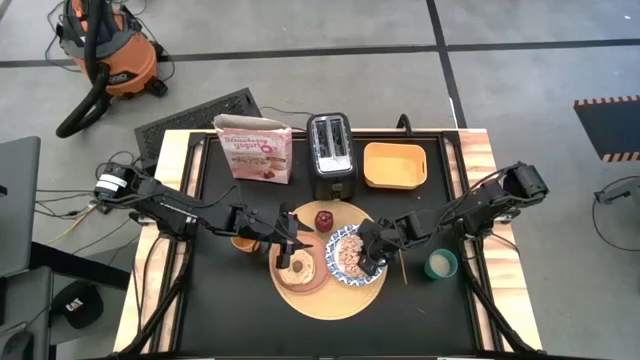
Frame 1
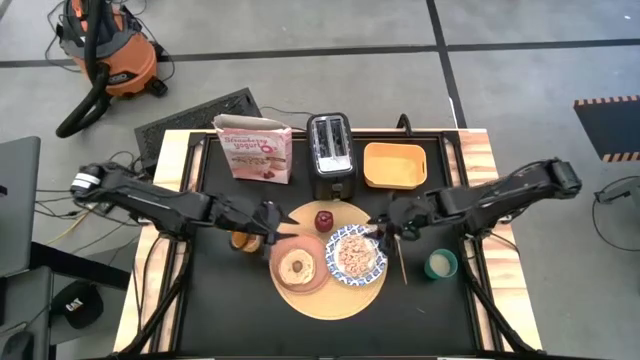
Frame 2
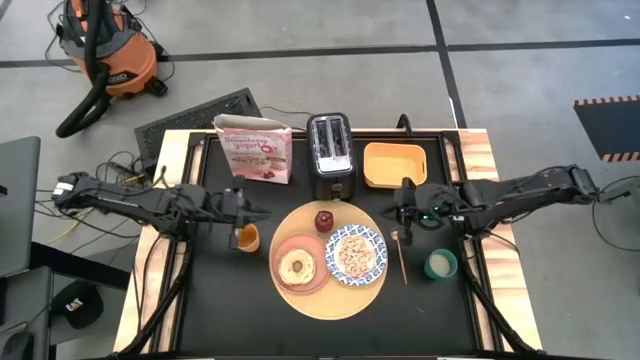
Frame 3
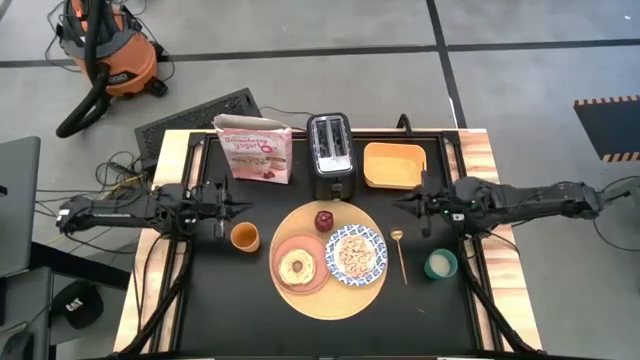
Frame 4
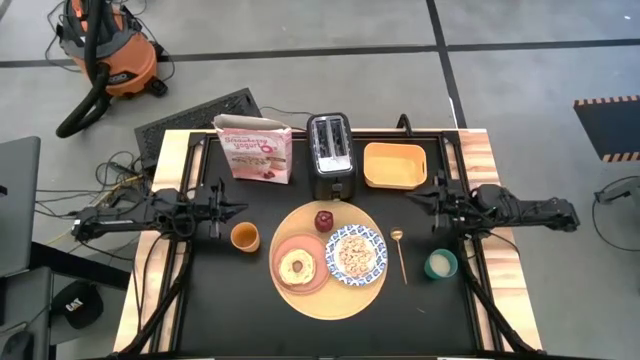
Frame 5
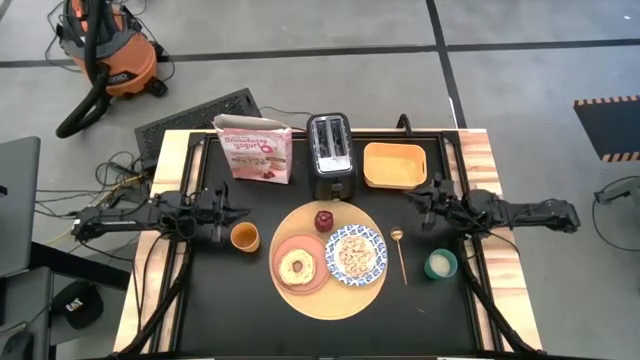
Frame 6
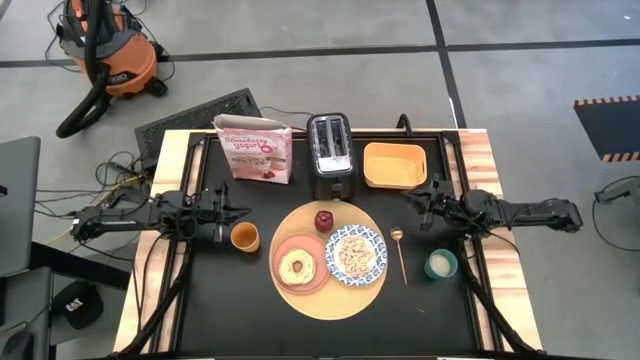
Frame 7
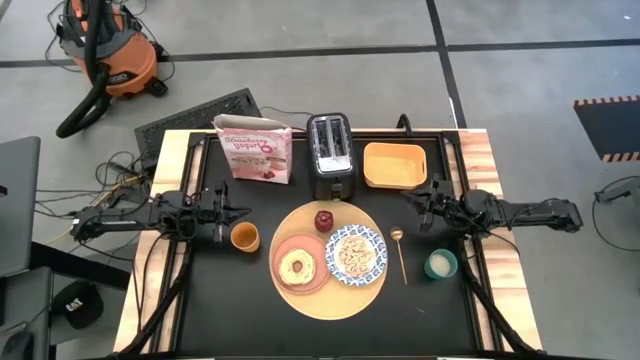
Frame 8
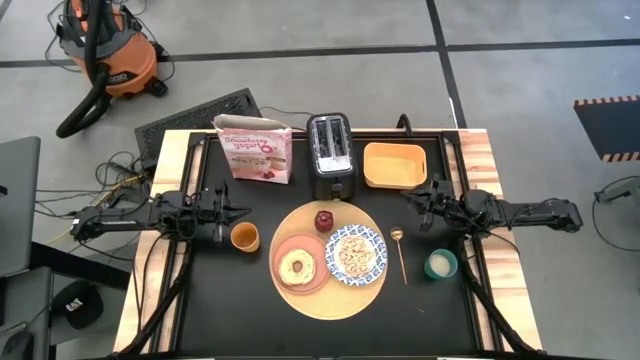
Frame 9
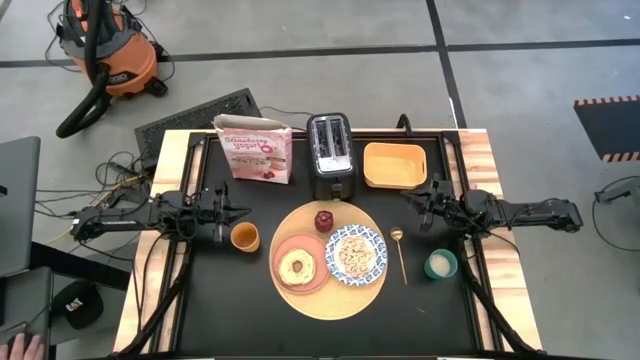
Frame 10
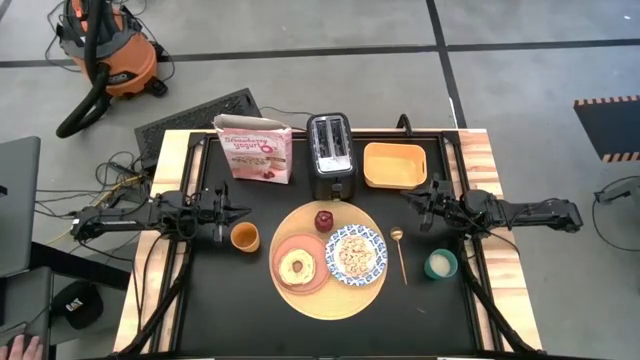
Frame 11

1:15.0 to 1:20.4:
Task: Arrange a breakfast setting
Return to Home Position

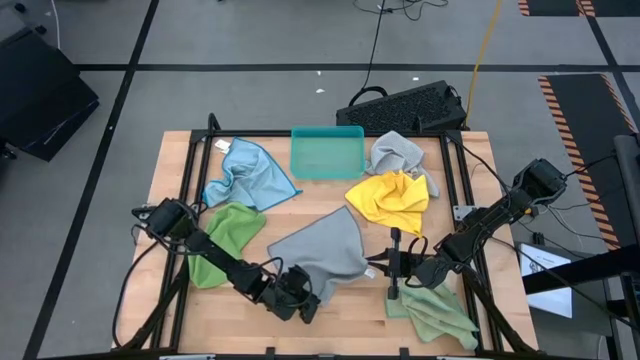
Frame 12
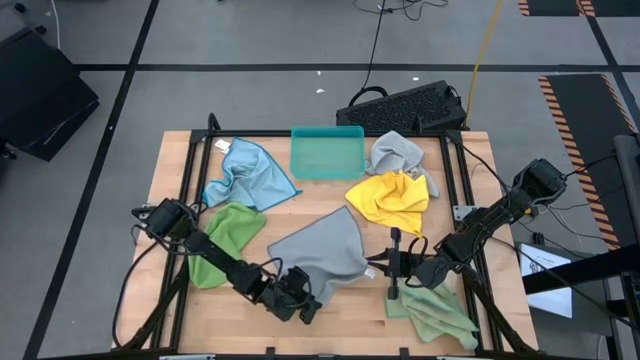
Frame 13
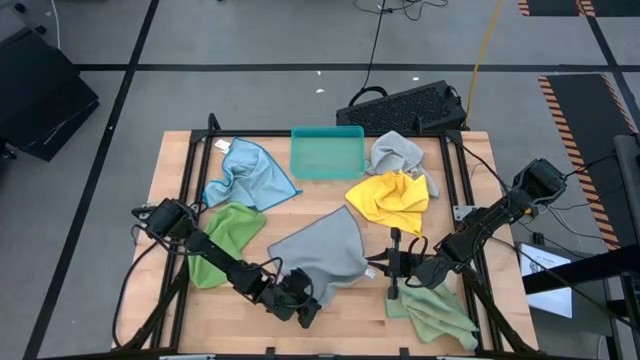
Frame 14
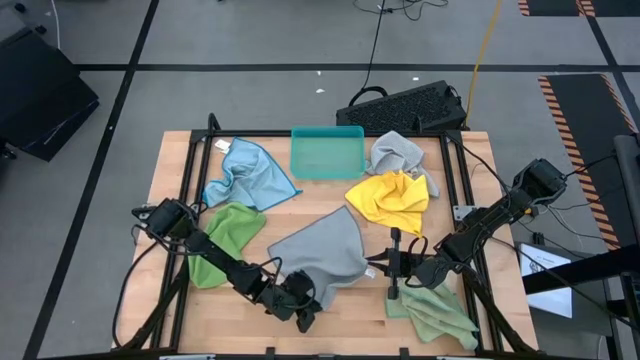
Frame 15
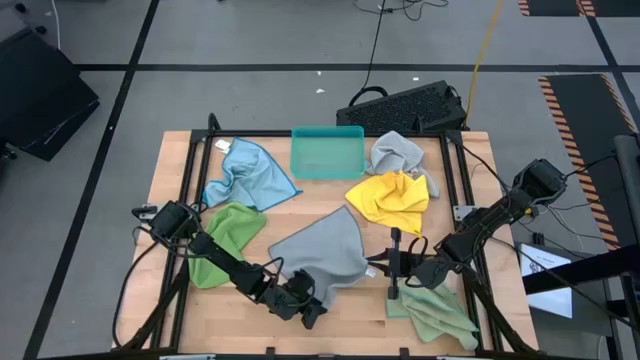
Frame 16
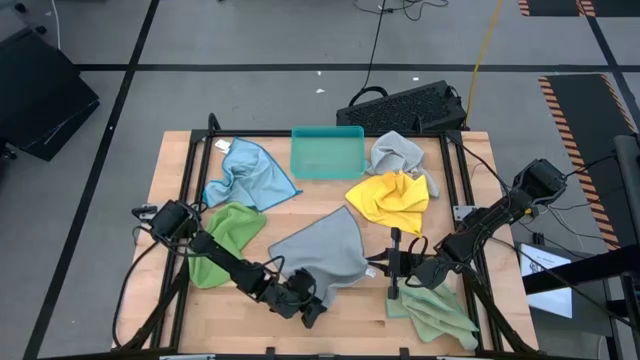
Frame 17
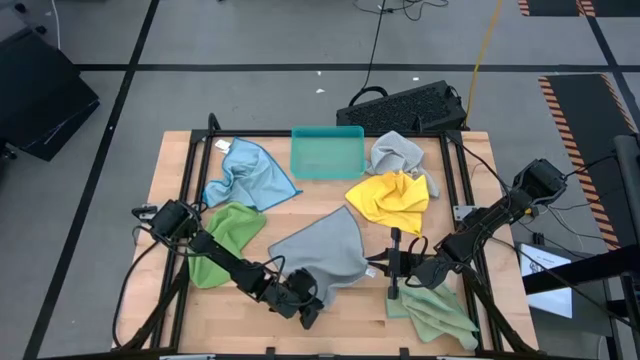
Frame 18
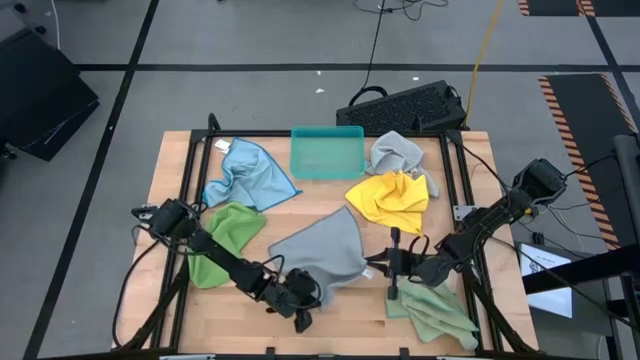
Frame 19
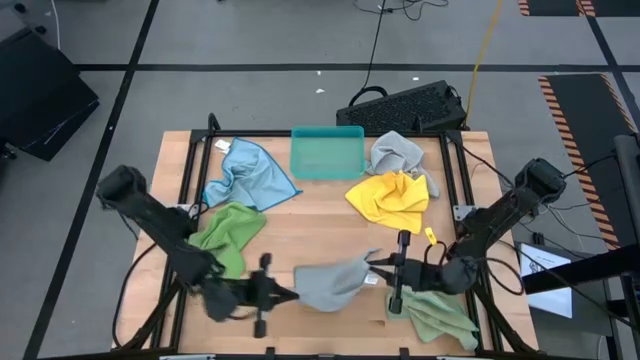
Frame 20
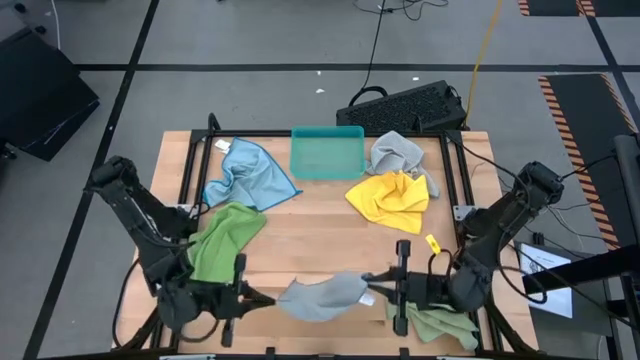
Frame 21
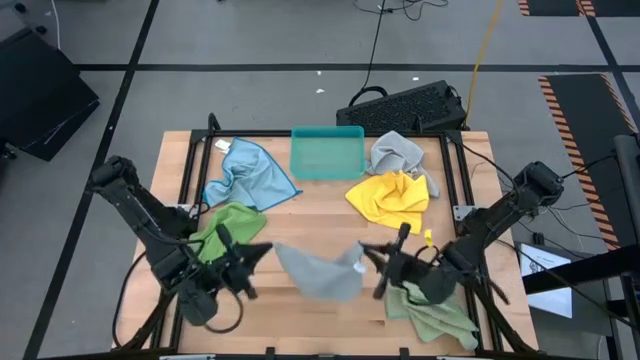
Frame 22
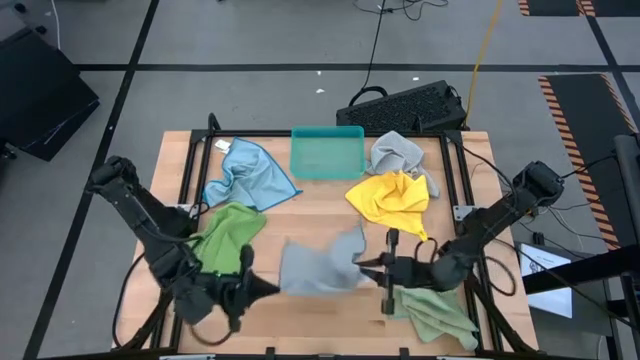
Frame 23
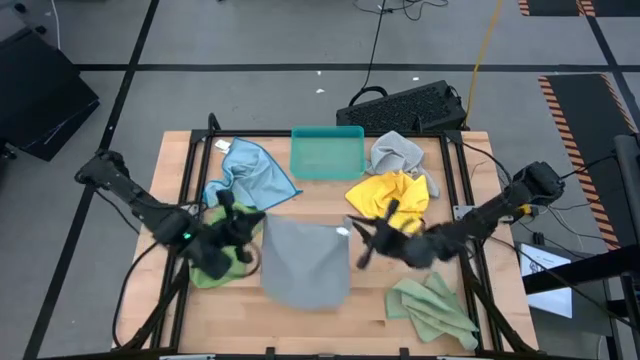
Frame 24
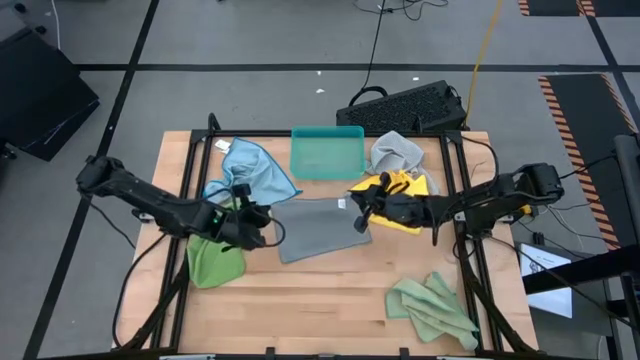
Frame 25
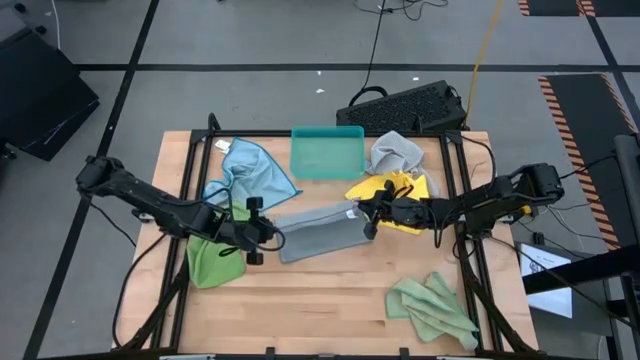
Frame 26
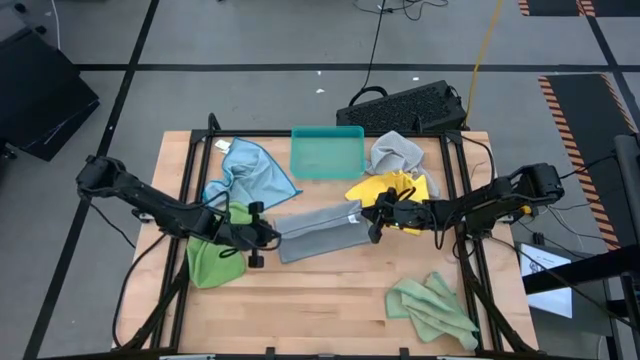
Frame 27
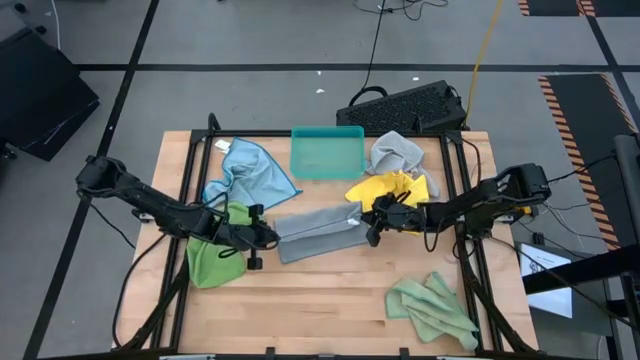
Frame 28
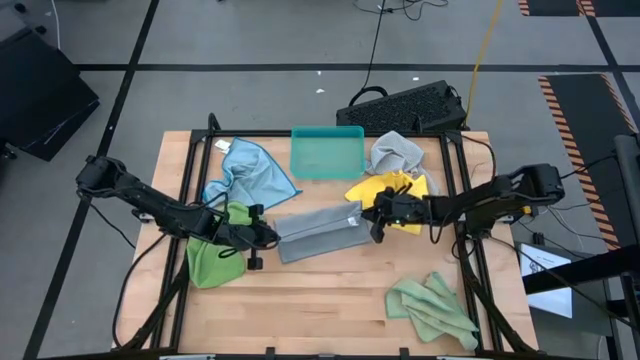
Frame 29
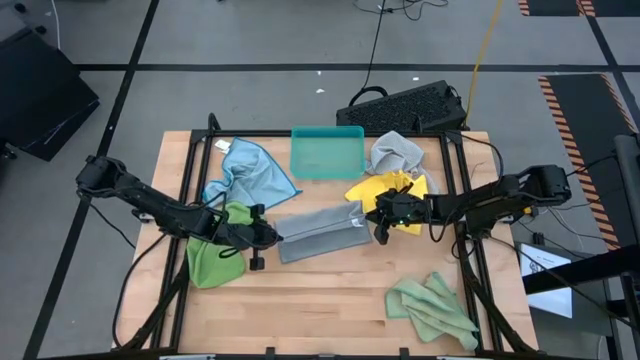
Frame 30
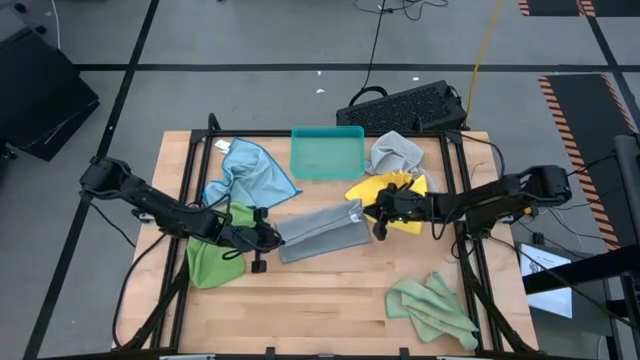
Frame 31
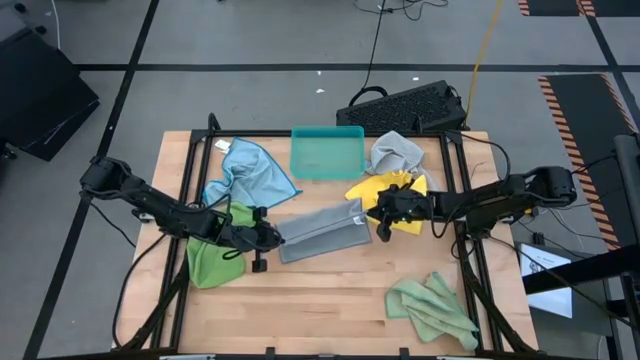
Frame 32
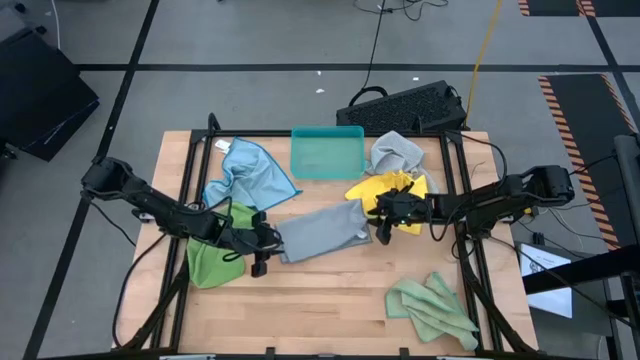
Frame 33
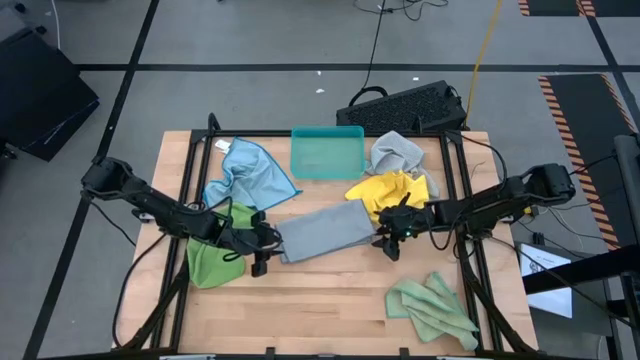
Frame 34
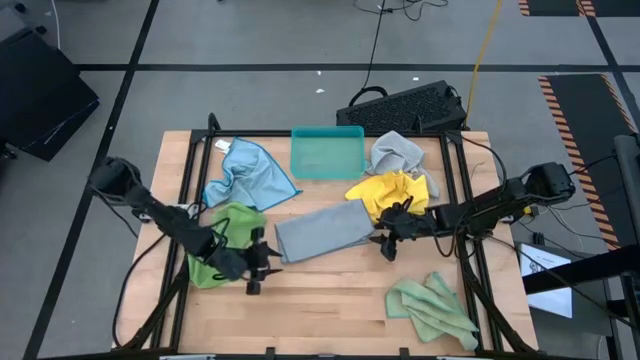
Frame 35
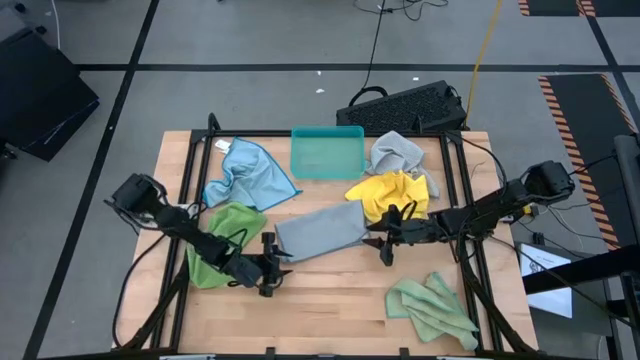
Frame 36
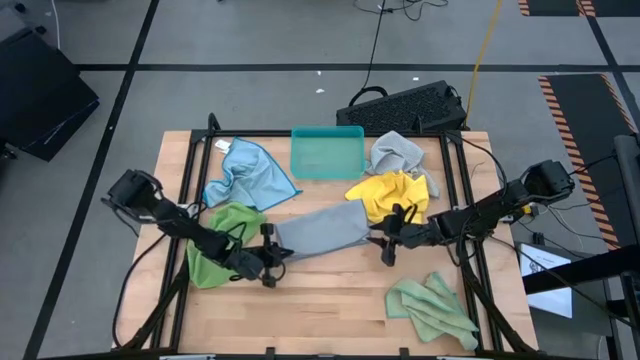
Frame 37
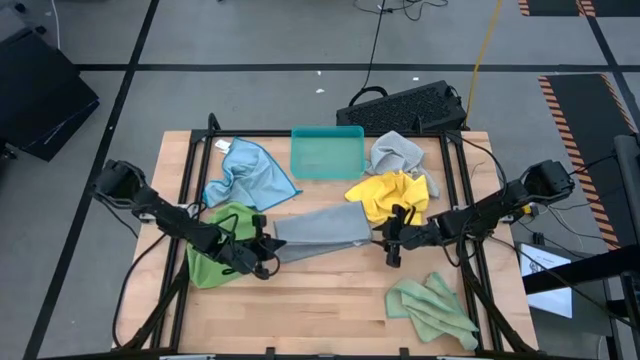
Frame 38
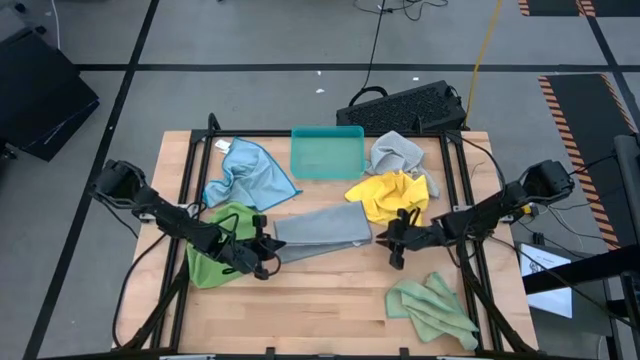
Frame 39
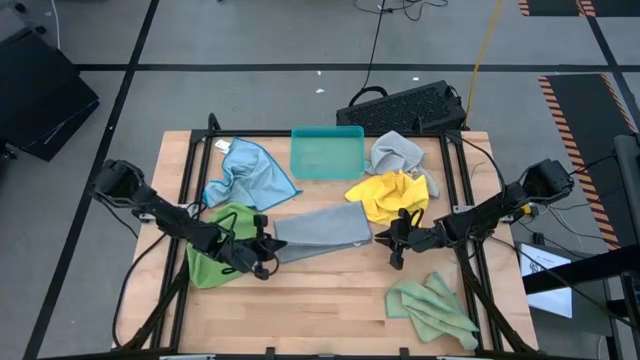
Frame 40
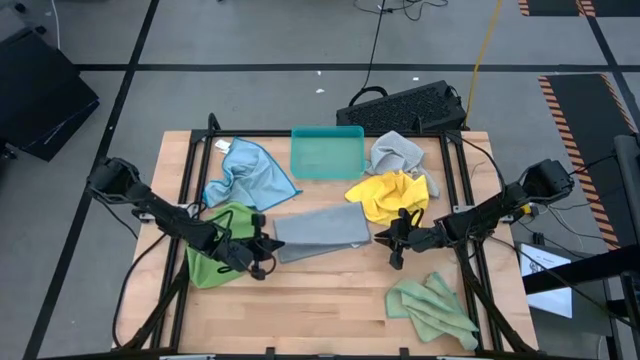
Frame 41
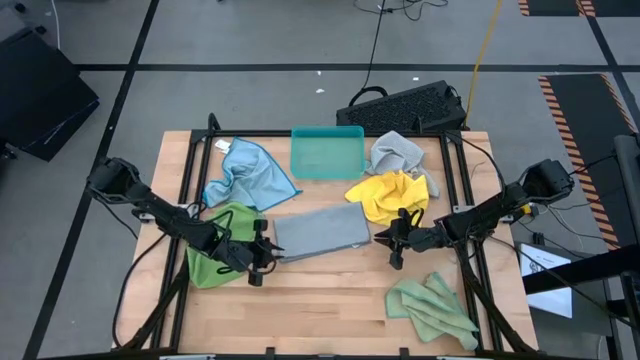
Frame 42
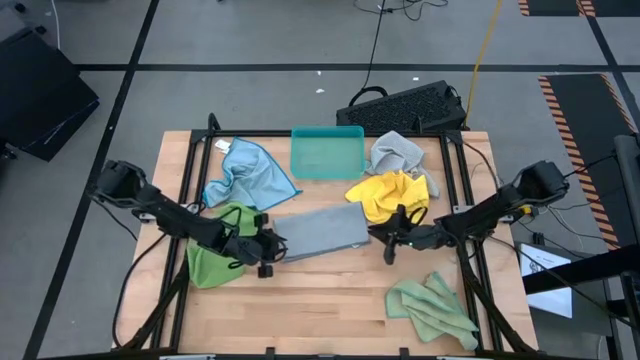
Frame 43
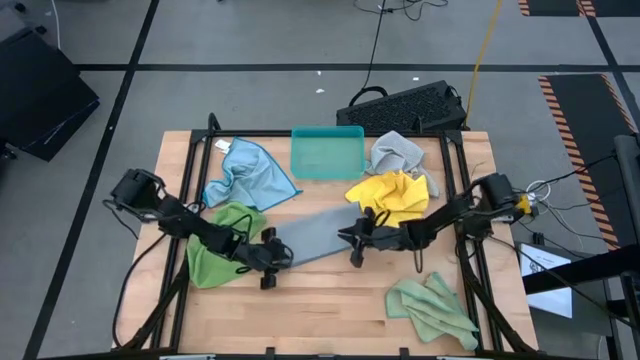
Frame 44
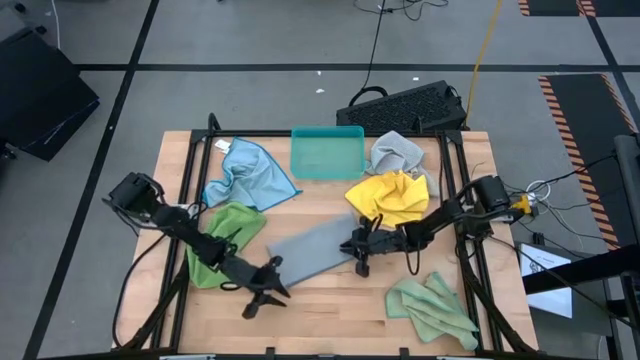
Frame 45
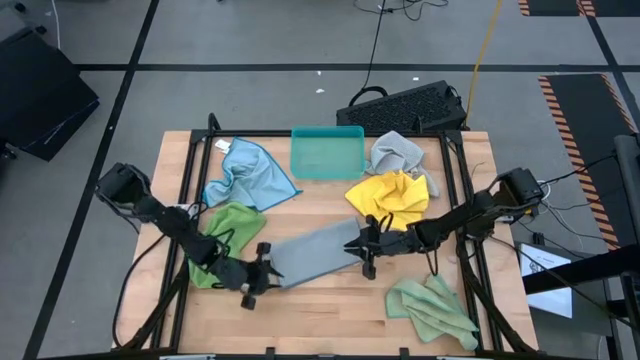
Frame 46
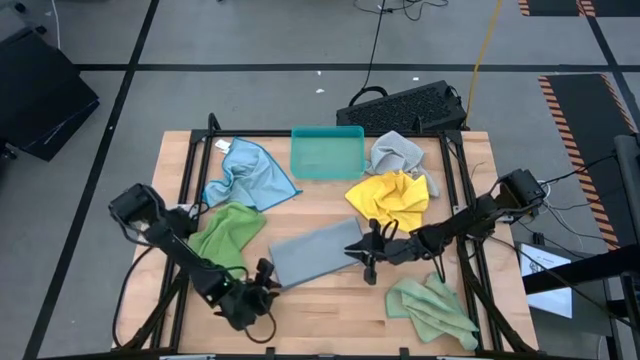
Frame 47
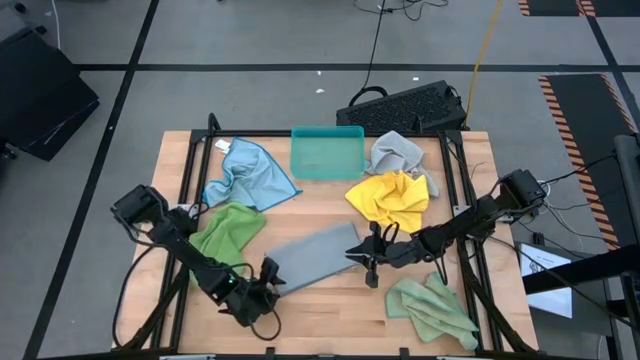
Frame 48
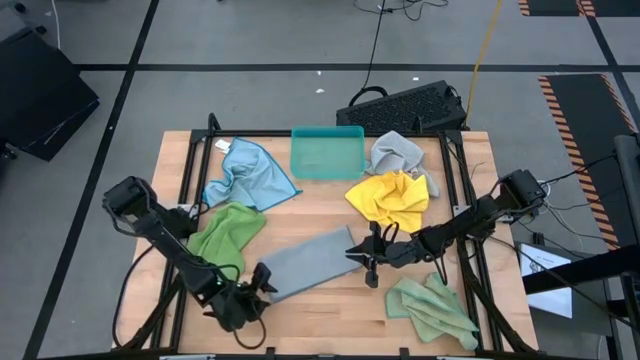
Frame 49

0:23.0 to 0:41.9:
Task: Fold microfiber towels
Fold the dark gray microfiber cloth
